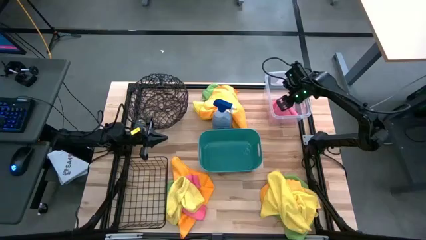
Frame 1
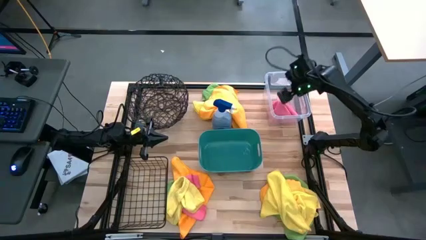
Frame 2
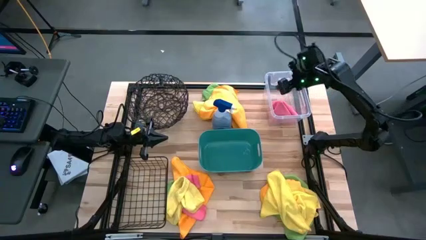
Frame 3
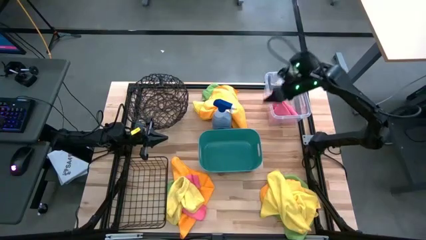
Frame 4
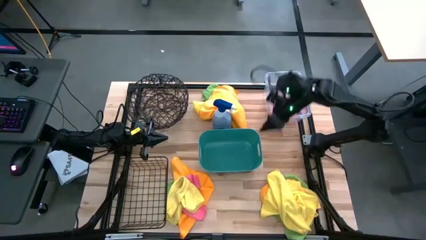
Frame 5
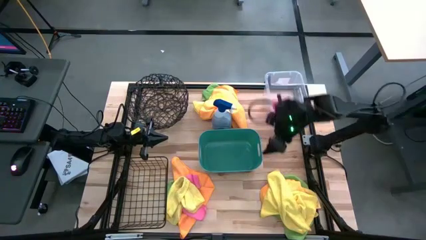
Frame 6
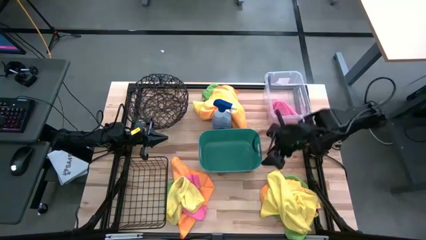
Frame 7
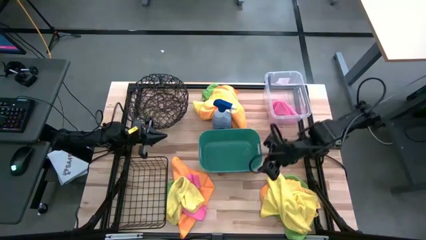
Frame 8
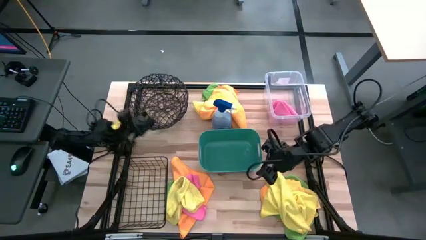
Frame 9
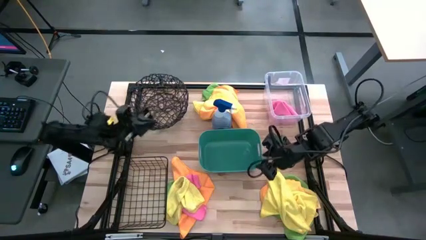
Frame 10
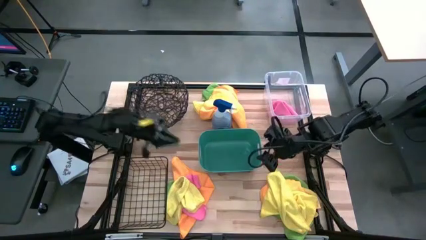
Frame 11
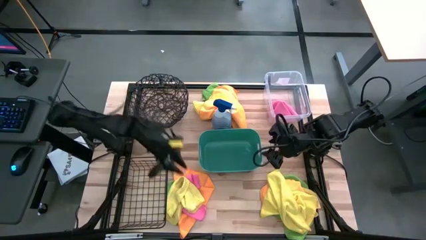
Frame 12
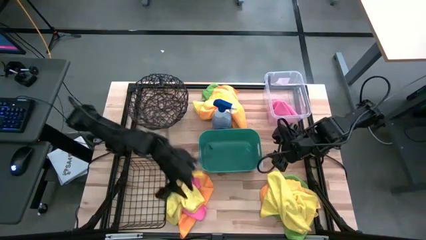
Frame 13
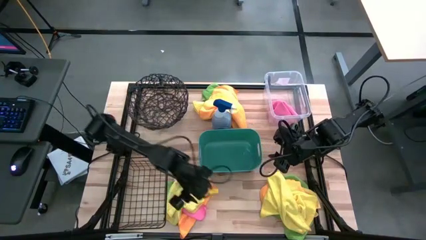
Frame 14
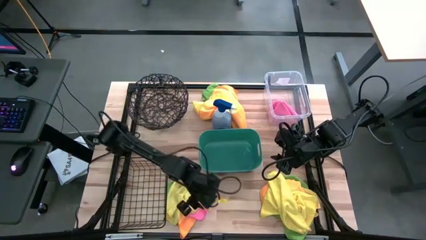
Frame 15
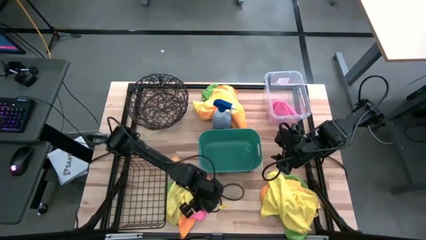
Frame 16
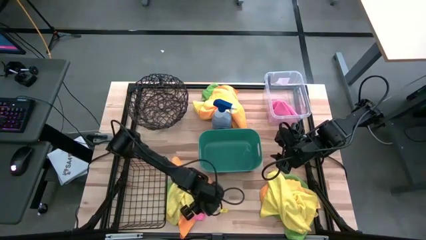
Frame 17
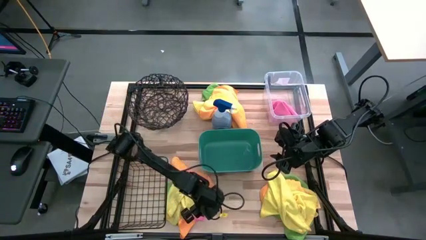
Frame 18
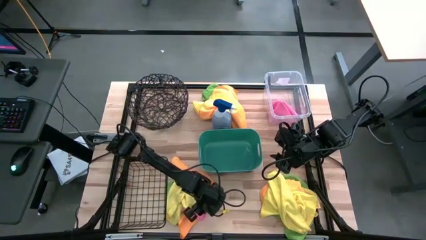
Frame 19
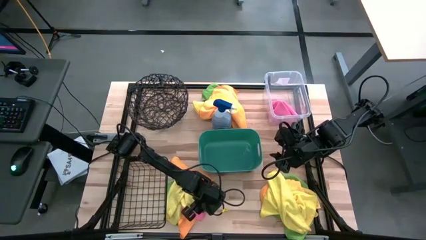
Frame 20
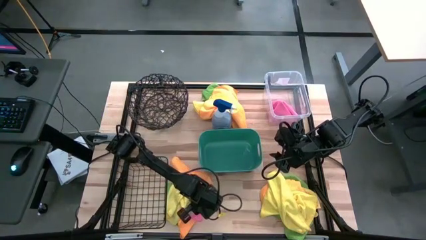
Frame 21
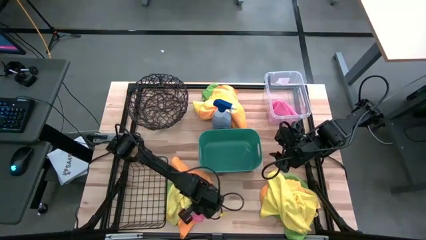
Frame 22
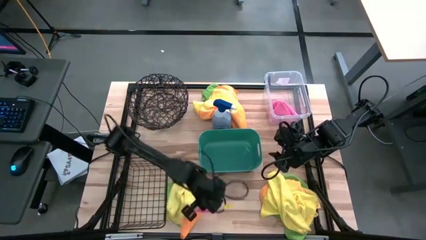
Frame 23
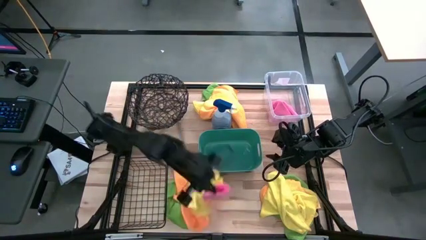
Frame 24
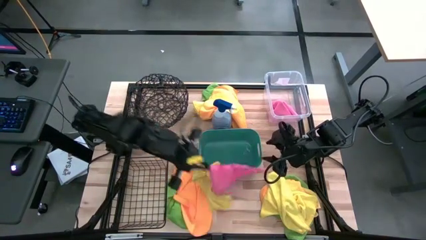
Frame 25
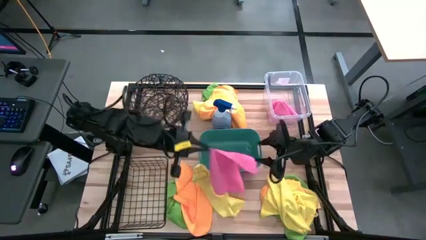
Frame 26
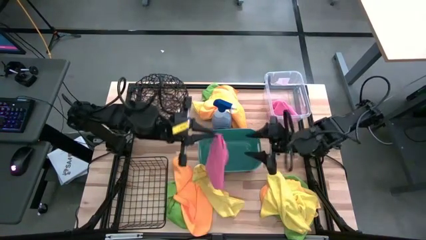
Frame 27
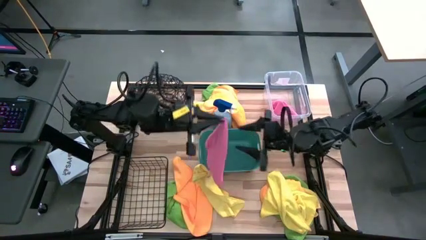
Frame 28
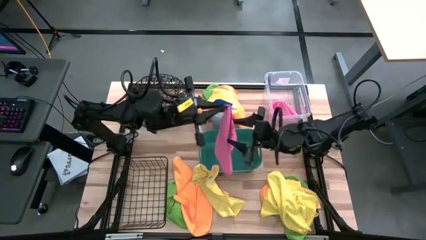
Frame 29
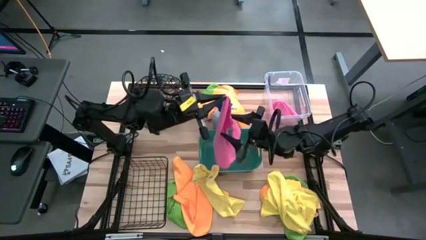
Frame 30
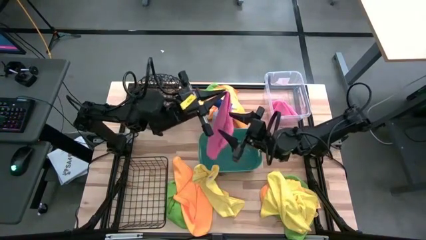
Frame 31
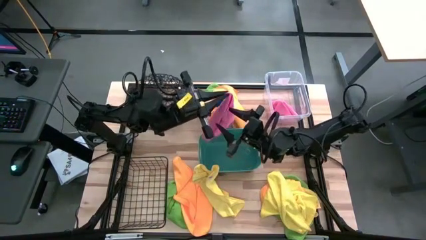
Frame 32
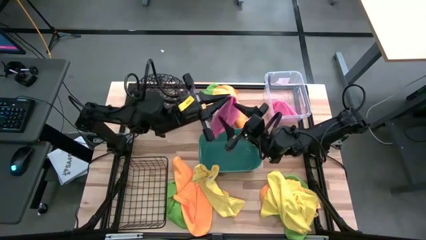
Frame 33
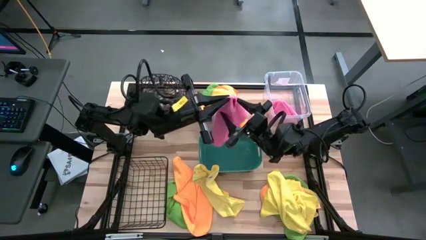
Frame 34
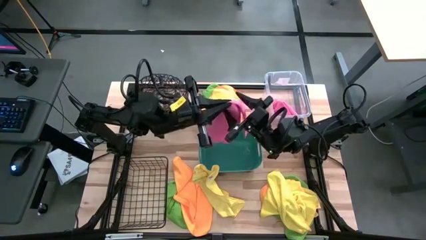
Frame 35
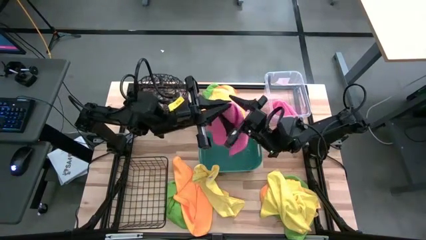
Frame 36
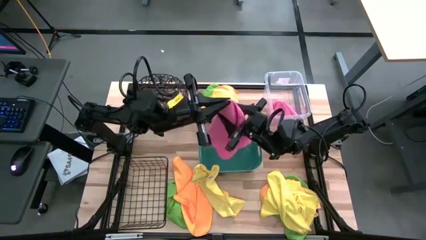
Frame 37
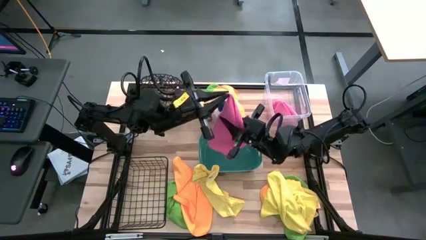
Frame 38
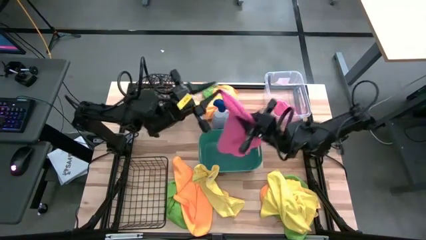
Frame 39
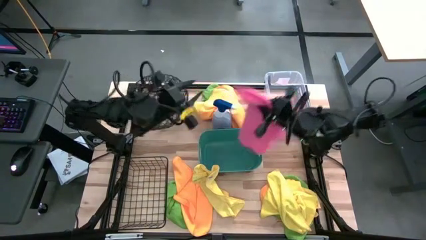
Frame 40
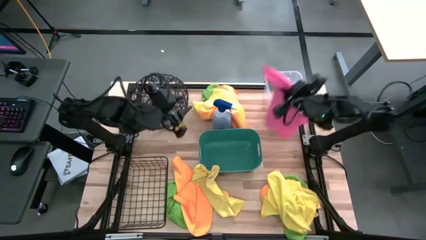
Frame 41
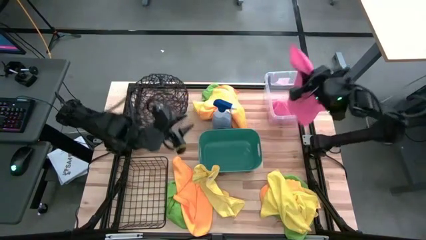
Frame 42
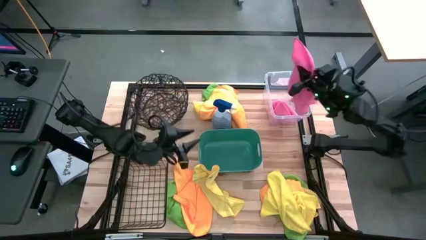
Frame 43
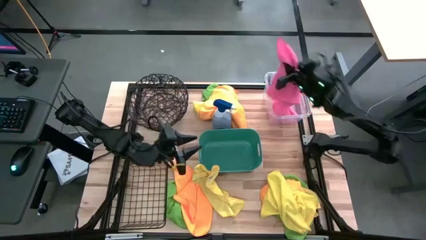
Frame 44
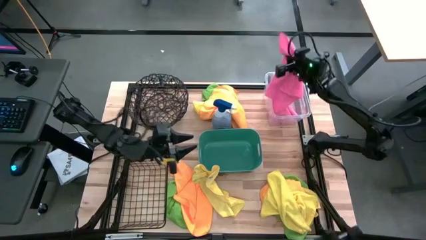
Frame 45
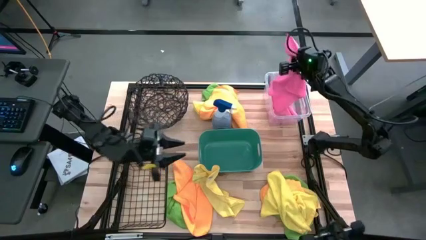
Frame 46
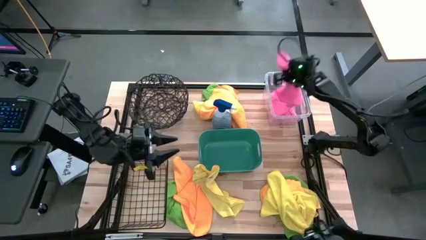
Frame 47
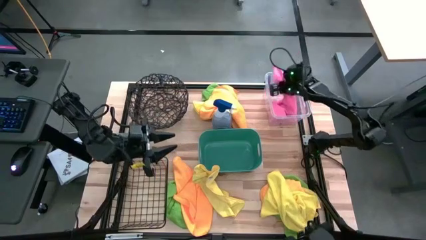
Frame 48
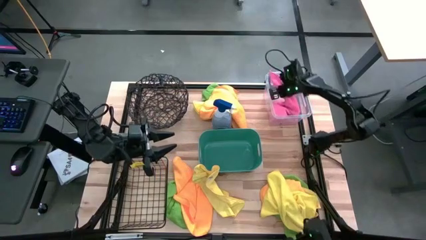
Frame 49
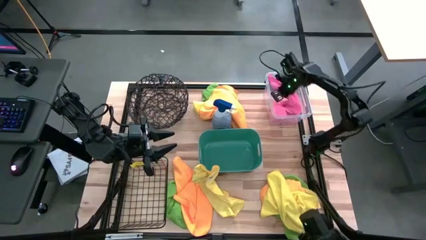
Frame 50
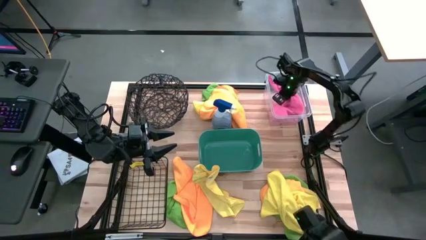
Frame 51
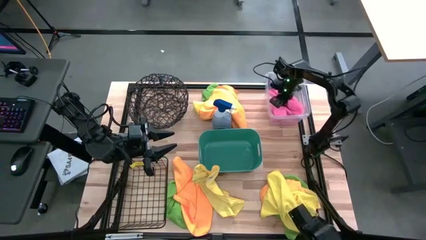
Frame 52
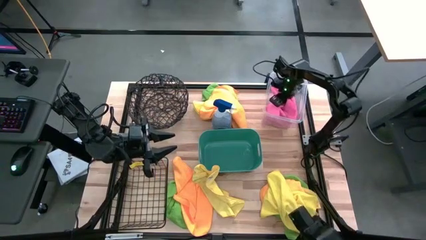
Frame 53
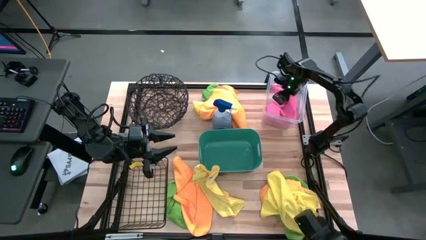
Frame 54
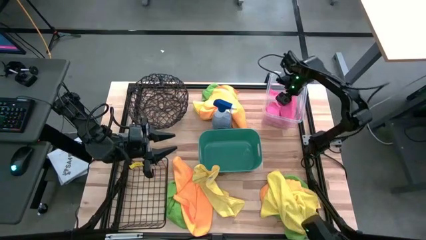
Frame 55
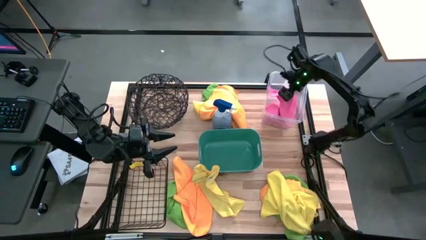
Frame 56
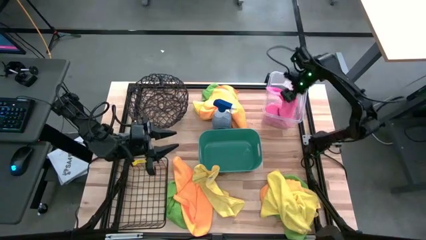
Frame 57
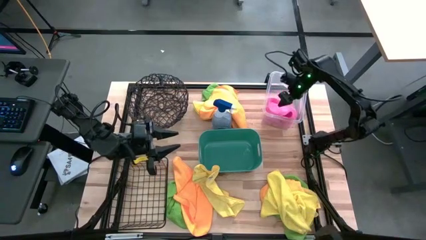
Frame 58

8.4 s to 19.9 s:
Task: Sort microfiber towel by color & place in baskets
Put the pink towel into the transparent bin

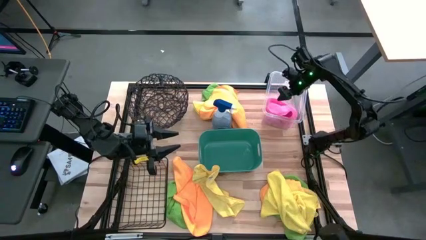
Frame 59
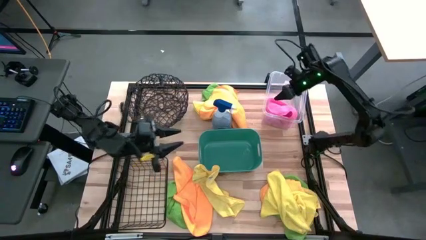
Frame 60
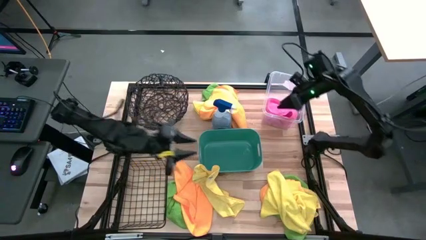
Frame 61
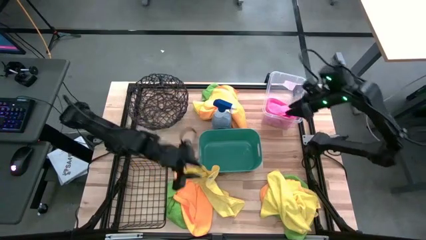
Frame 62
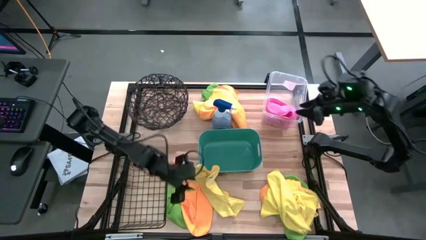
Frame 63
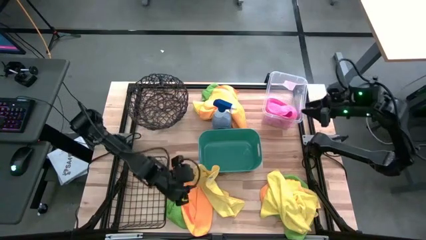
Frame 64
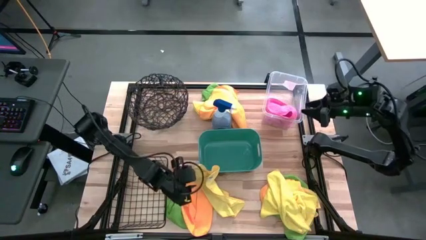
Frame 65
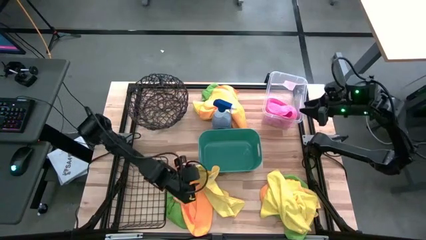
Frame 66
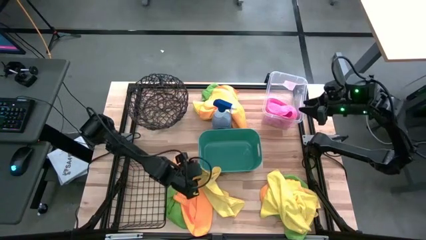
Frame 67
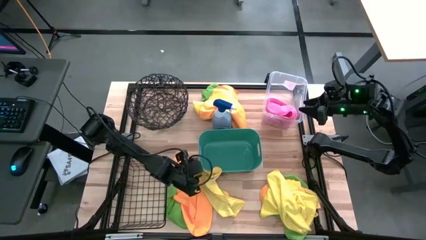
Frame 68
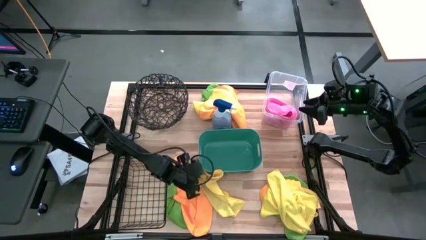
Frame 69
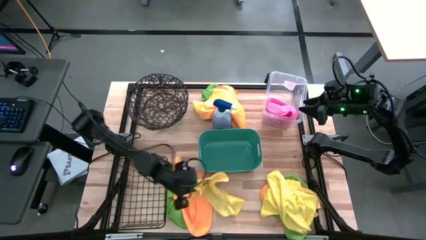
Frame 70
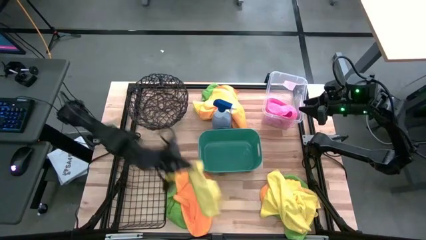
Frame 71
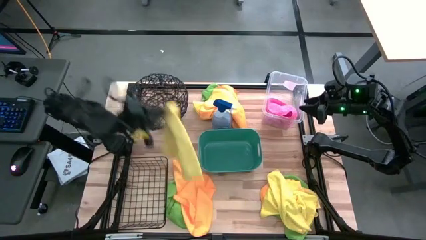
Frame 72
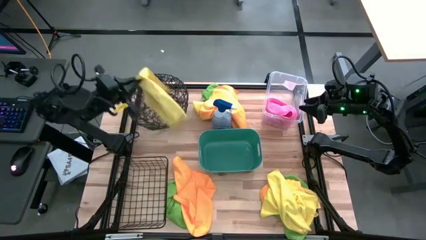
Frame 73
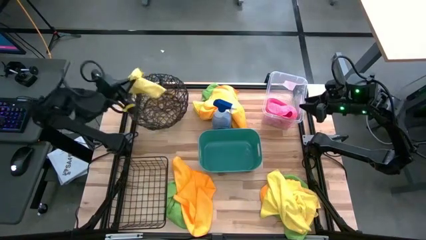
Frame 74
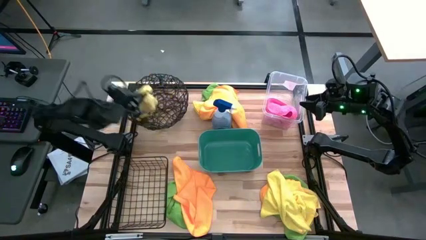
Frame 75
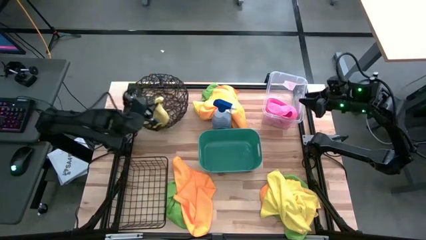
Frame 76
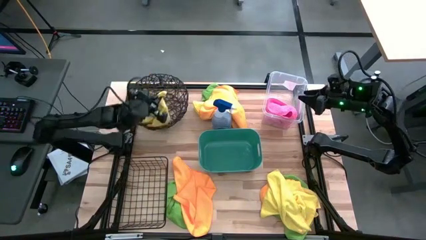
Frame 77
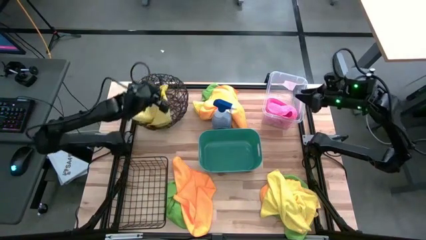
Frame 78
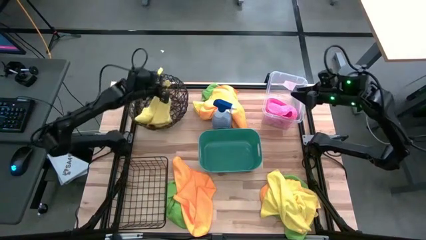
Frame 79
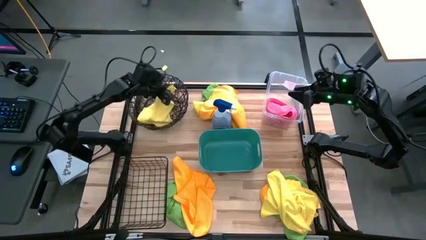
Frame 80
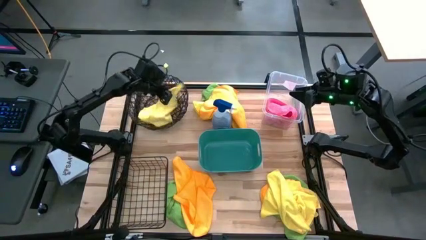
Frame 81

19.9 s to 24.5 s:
Put the bottom left yellow towel into the round brown basket

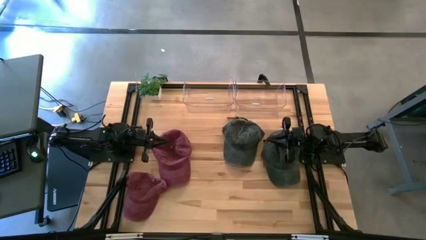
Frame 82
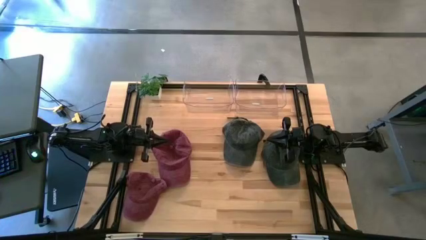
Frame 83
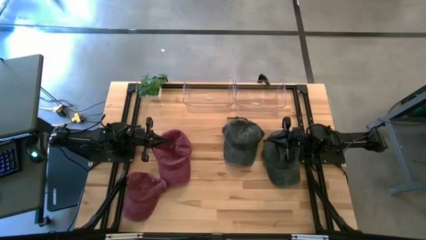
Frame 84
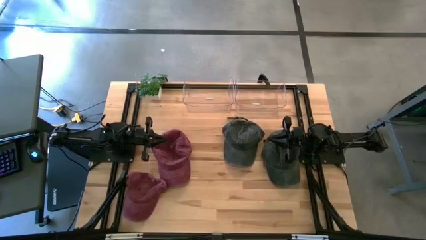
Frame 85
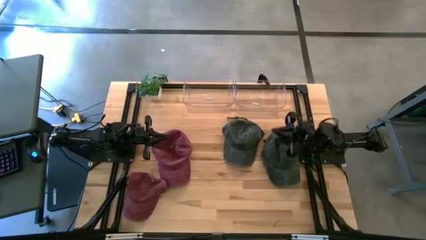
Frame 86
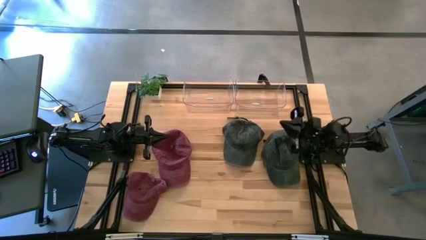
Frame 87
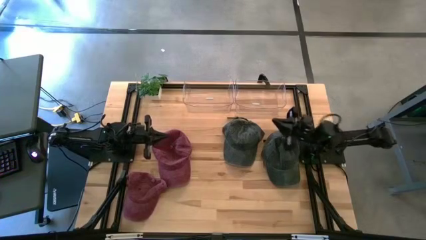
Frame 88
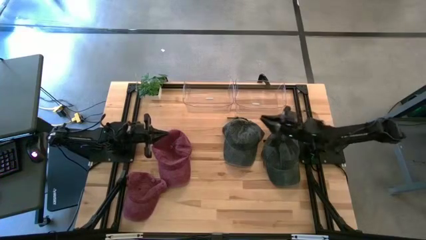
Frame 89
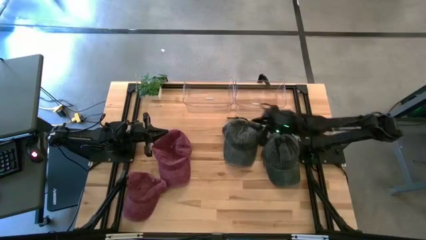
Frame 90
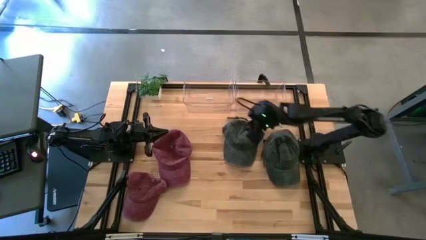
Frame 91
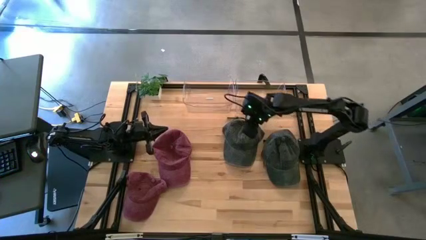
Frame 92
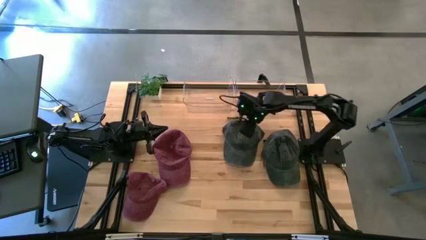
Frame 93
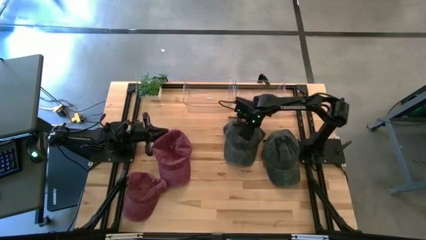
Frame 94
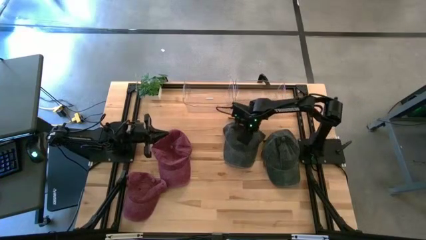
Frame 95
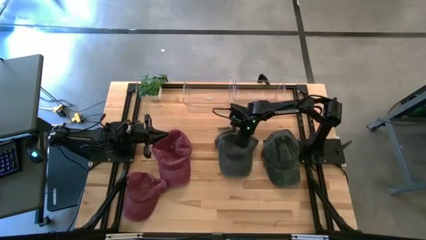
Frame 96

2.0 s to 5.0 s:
Task: Pick & Place hat
Put the left black cap into the left transparent bin
